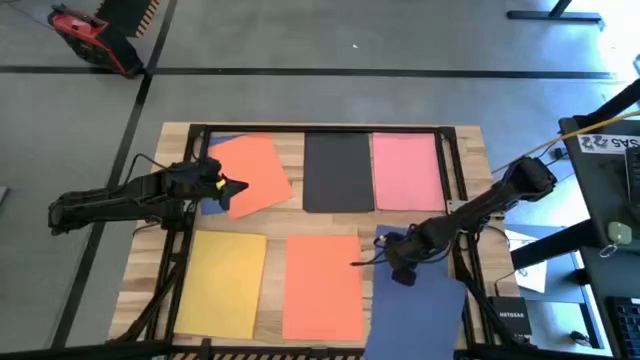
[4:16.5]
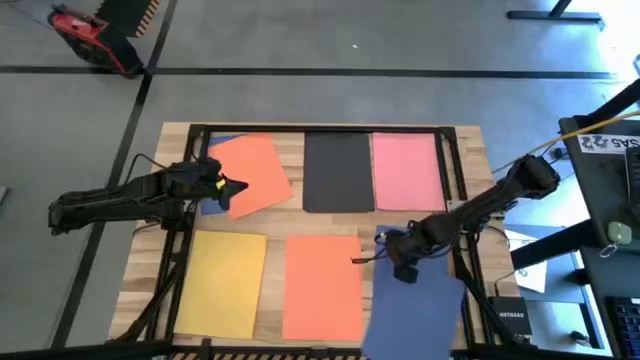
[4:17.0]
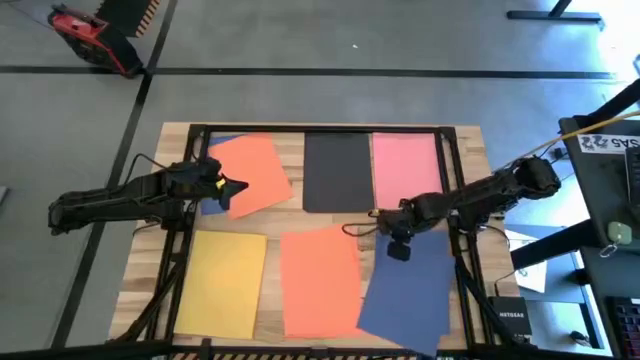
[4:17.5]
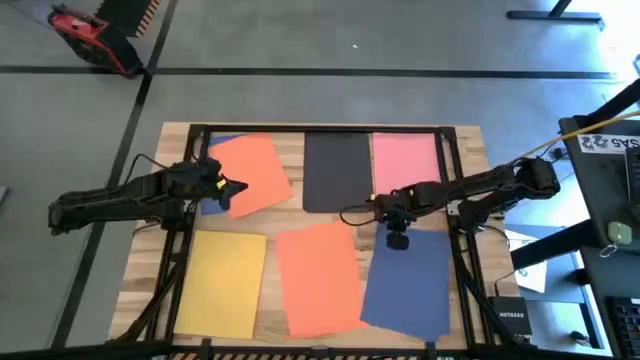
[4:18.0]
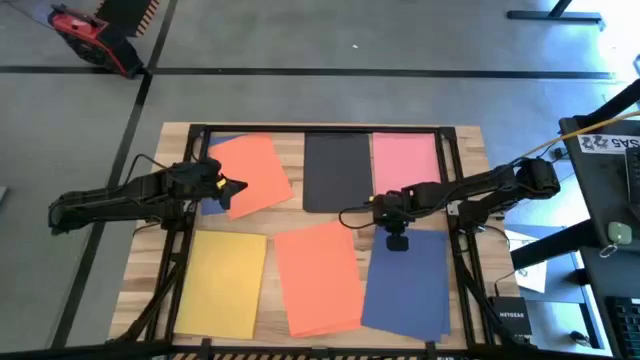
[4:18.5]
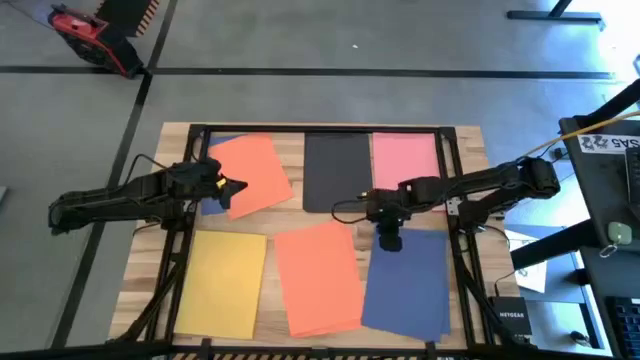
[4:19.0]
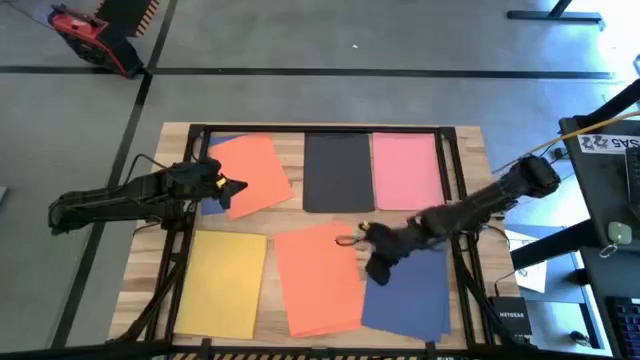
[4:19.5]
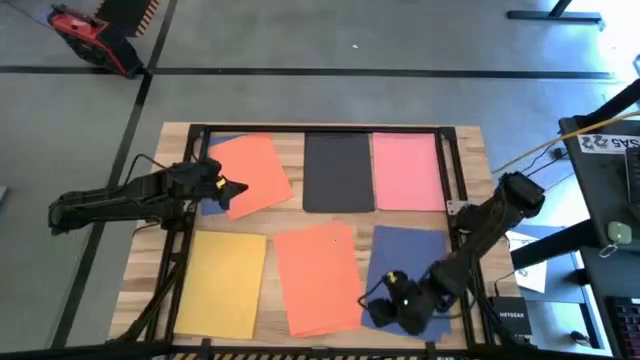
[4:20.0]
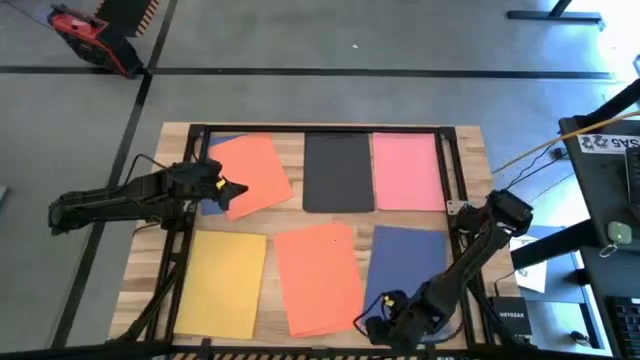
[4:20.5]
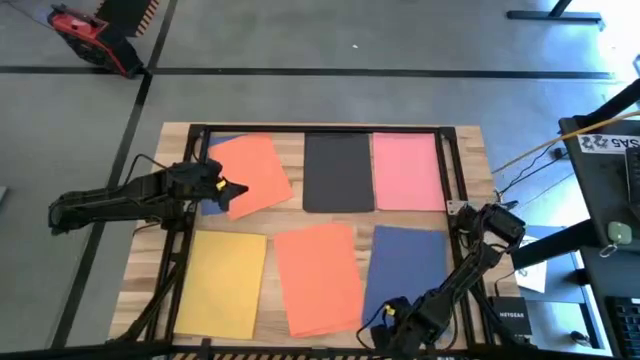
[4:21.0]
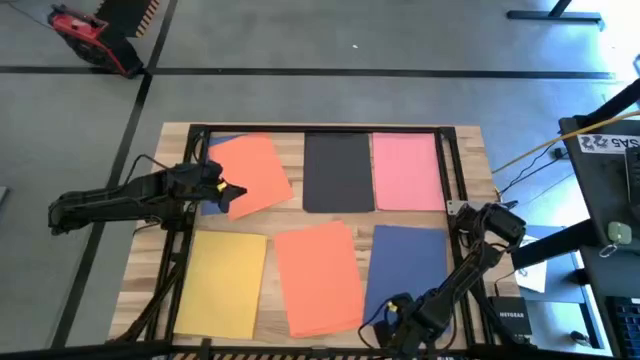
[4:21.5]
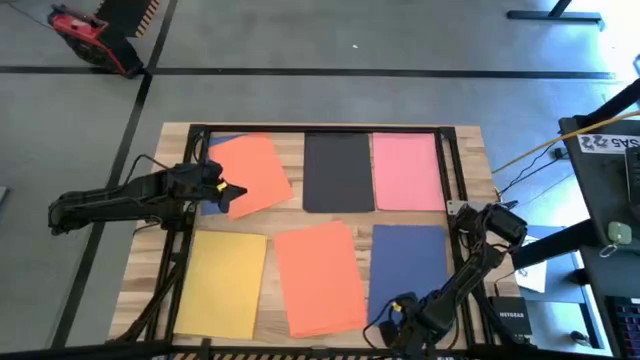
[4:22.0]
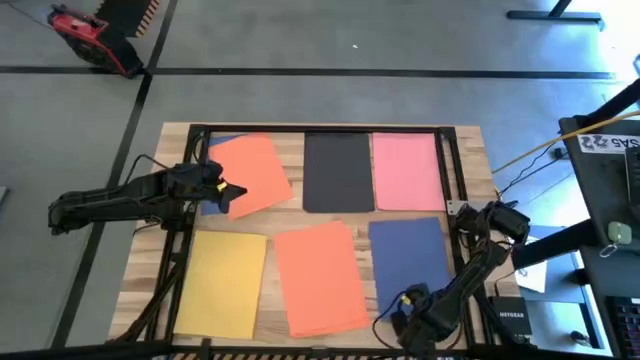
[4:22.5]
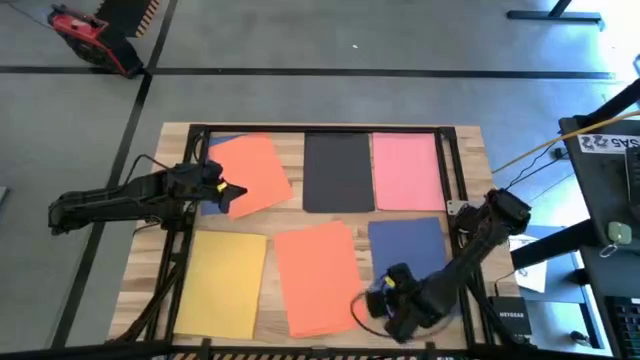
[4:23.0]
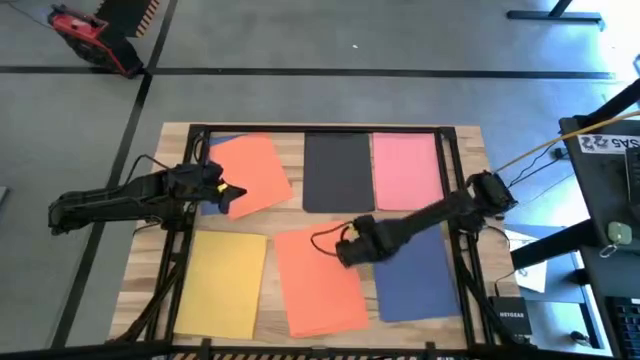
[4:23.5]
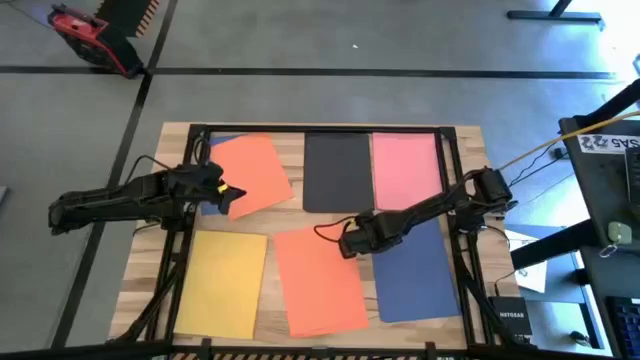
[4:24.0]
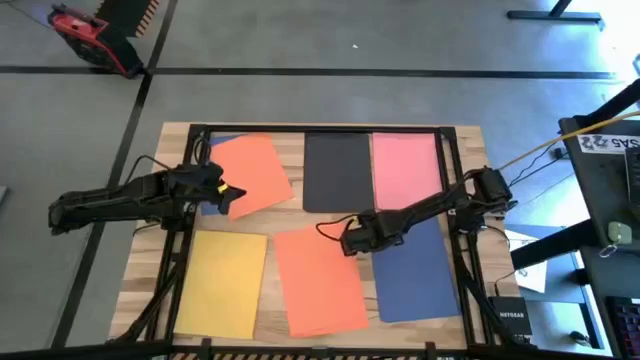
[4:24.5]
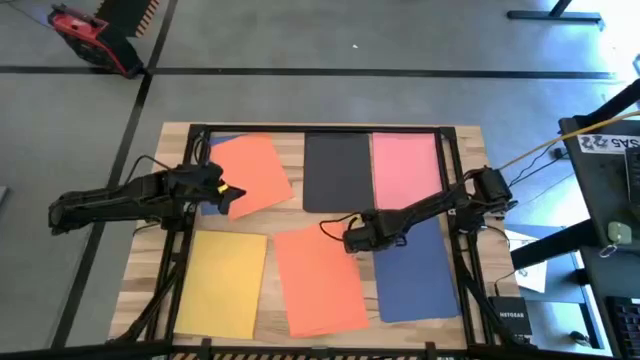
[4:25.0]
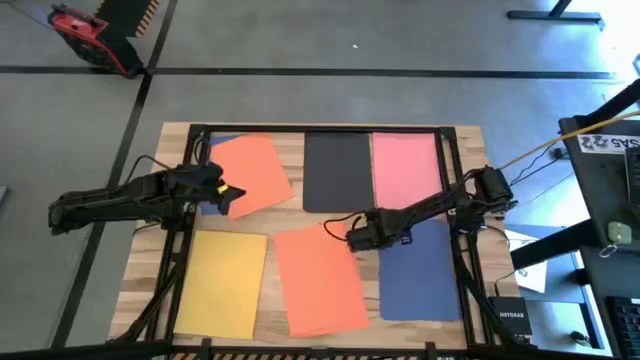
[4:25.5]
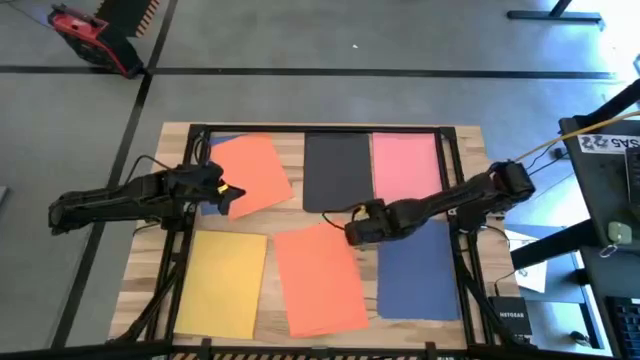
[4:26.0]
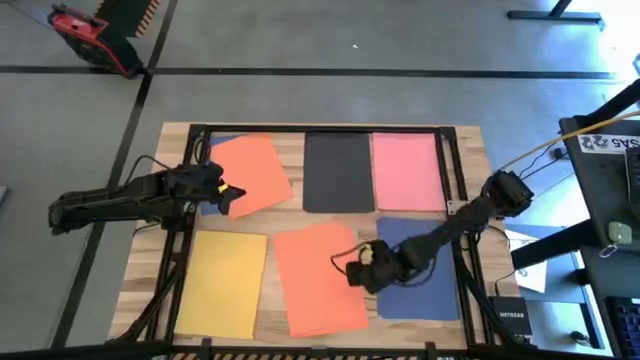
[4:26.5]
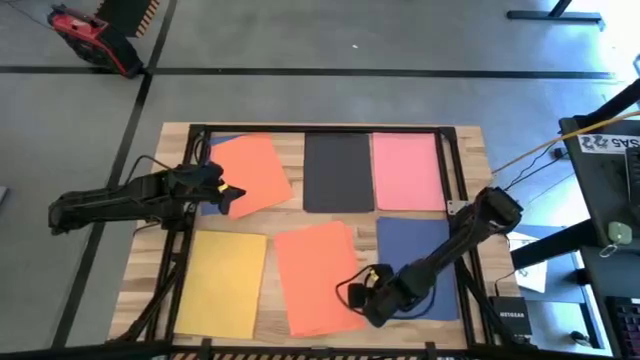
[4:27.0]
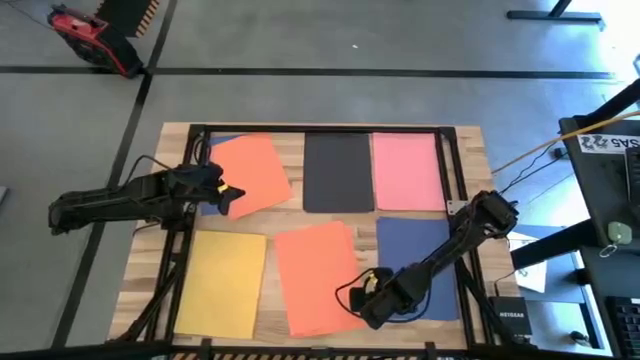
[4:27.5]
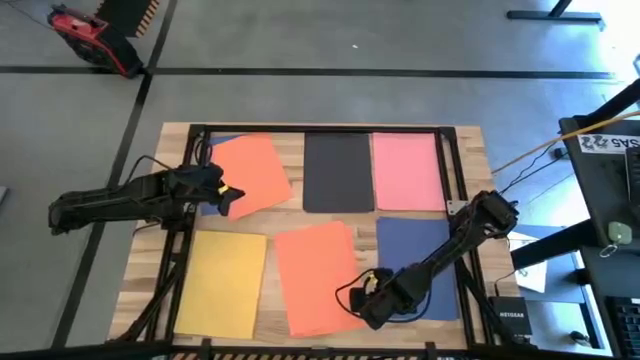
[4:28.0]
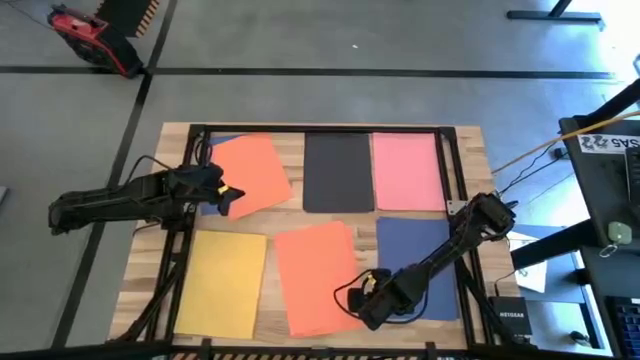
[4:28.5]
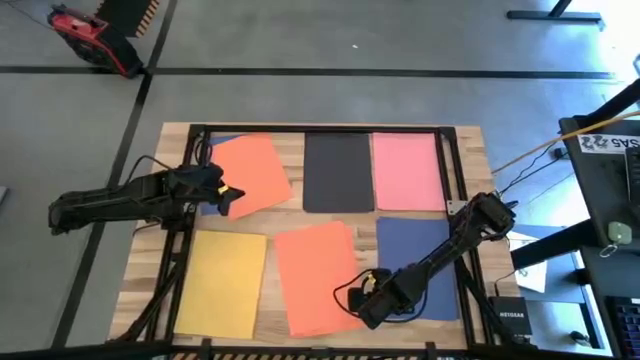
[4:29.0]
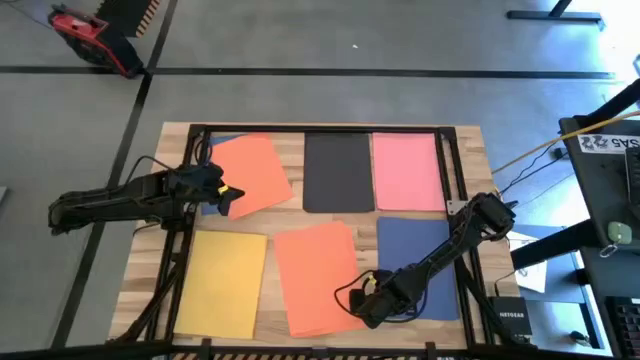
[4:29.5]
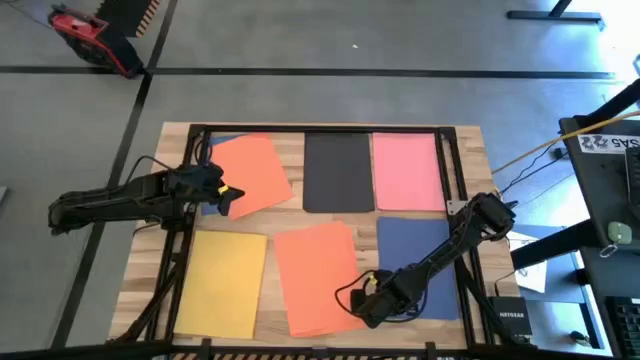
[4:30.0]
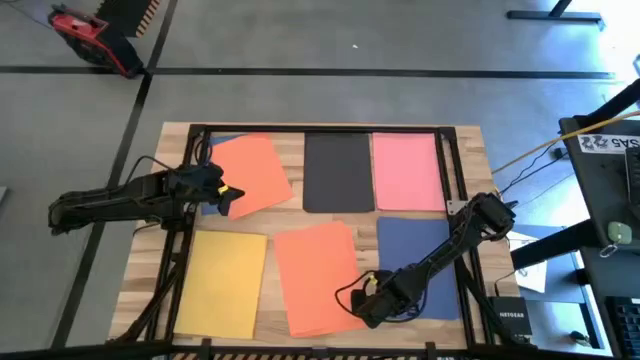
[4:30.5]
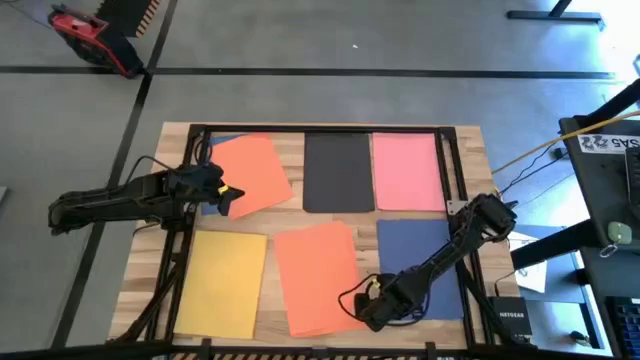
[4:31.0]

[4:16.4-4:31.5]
Task: Organize paper
Stack the blue paper on top of the other blue paper

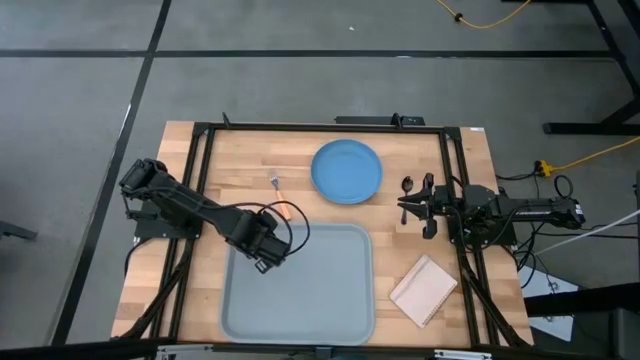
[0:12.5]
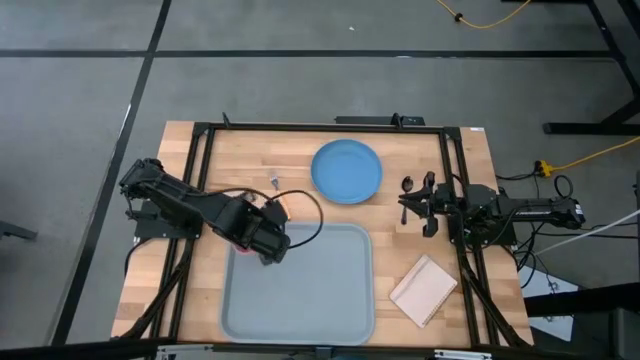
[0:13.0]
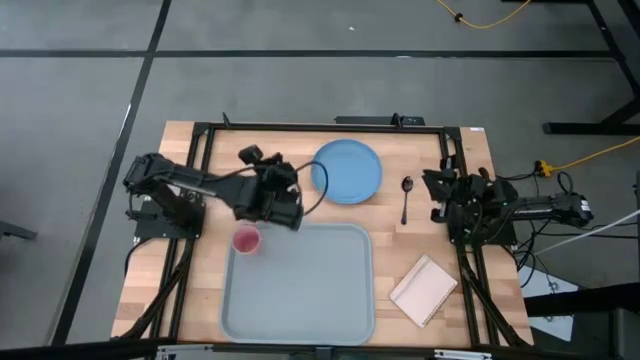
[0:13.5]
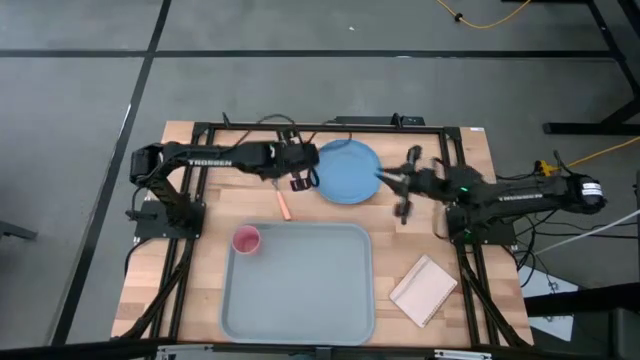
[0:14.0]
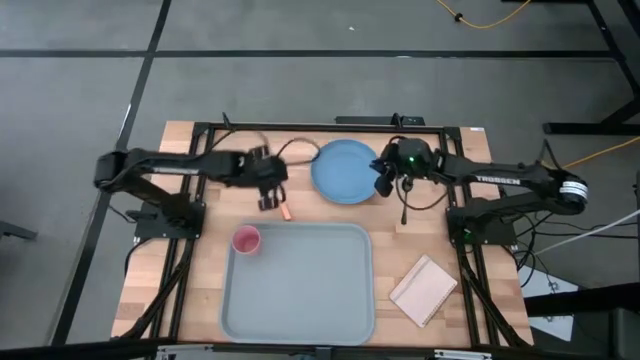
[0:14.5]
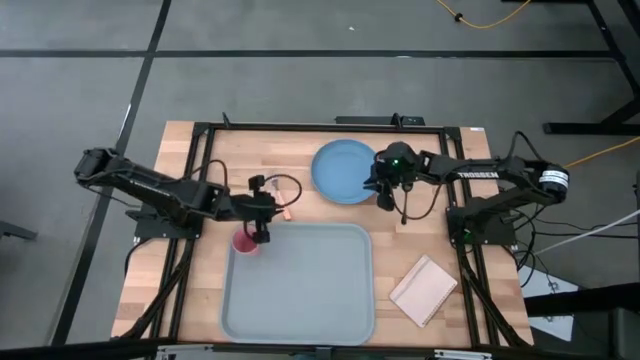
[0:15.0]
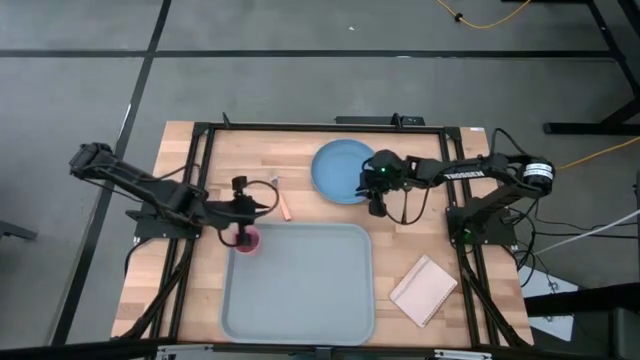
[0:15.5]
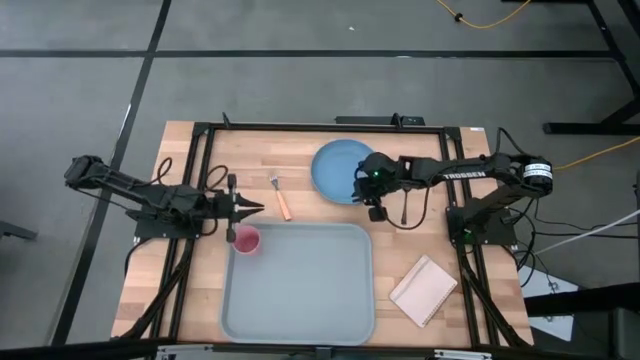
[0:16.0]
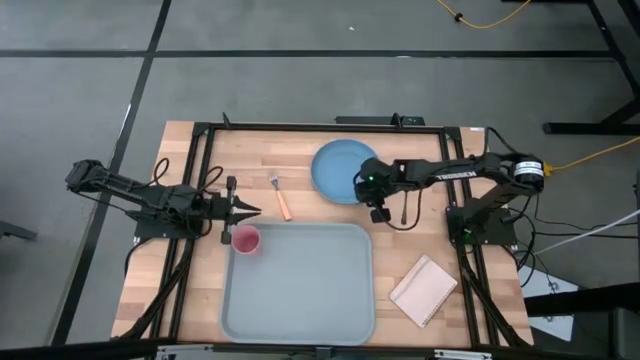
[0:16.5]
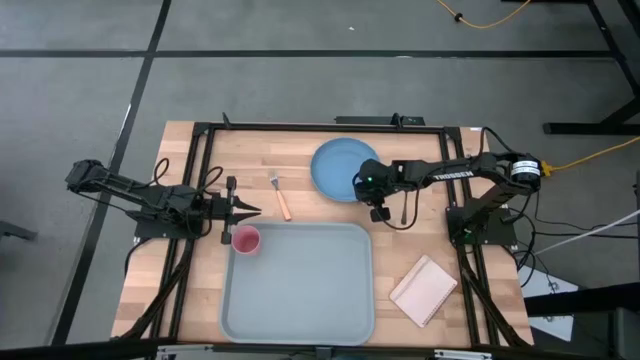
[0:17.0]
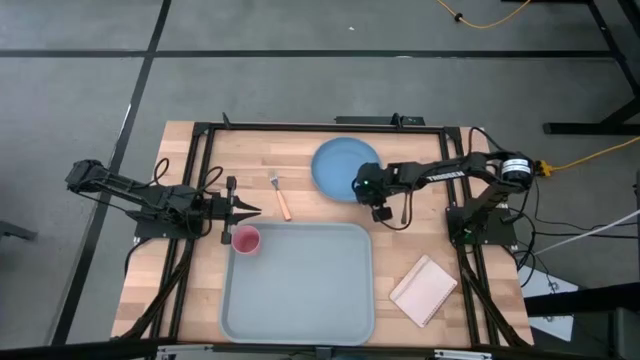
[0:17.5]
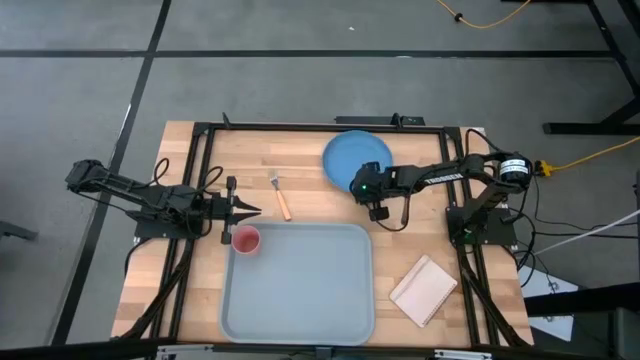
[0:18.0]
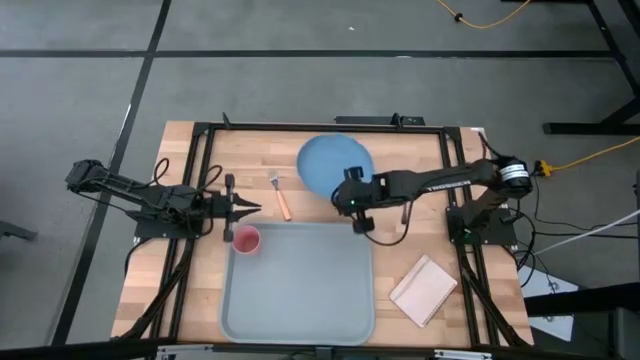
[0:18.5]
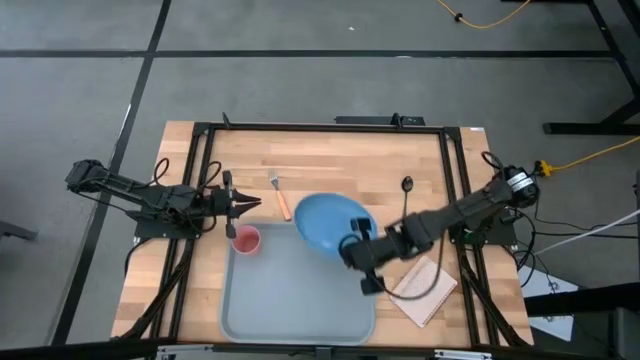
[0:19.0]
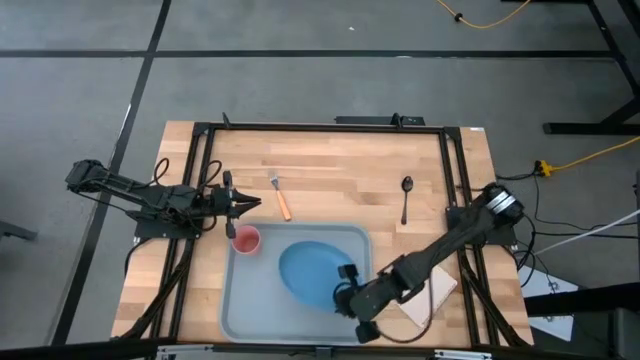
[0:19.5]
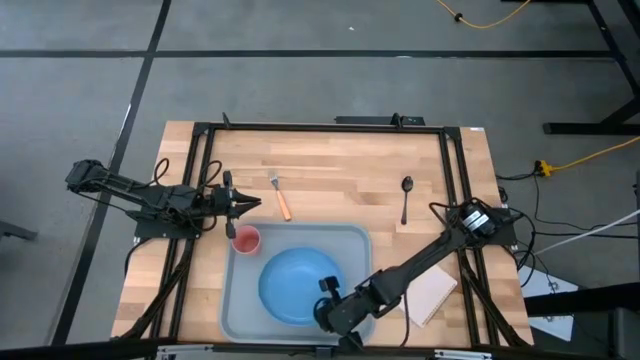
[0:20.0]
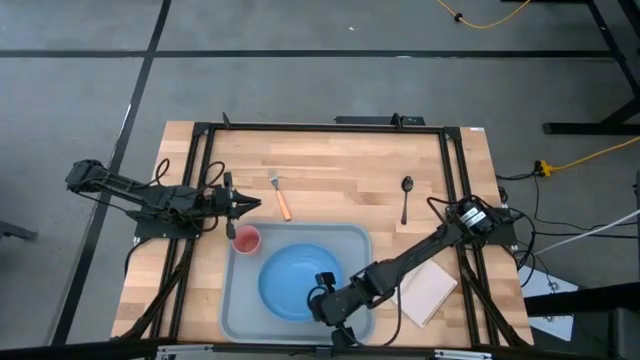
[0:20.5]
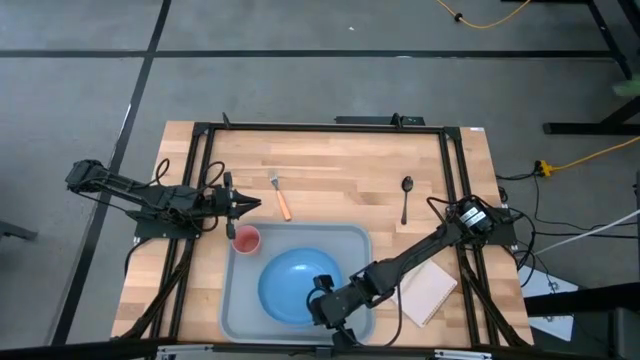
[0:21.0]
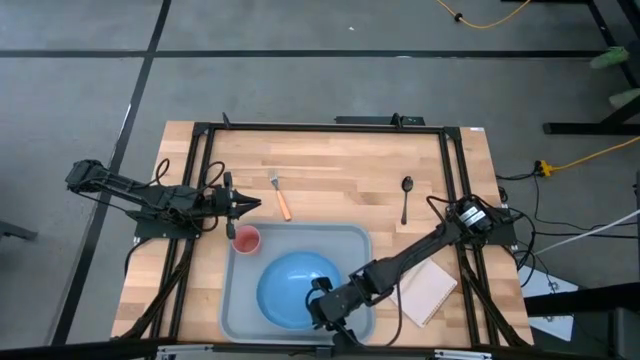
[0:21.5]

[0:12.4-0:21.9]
Task: Pick and place plate/cup/fork/spoon on tray
Put the blue plate to the bottom of the pink cup on the gray serving tray
